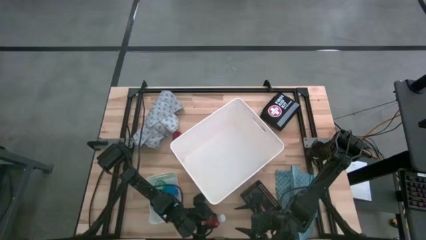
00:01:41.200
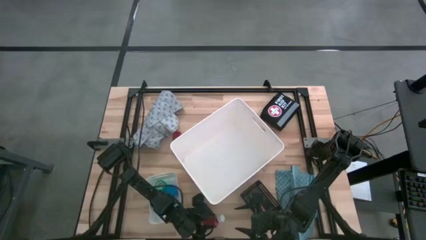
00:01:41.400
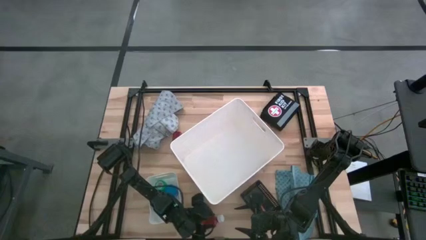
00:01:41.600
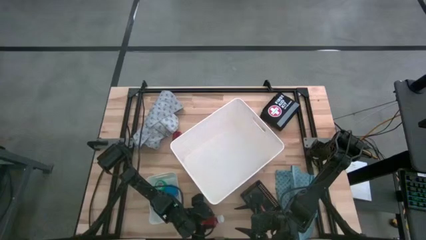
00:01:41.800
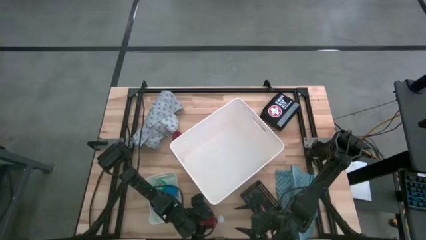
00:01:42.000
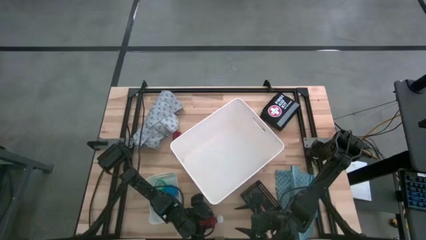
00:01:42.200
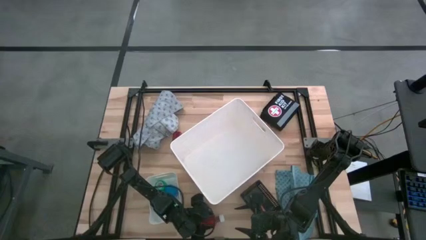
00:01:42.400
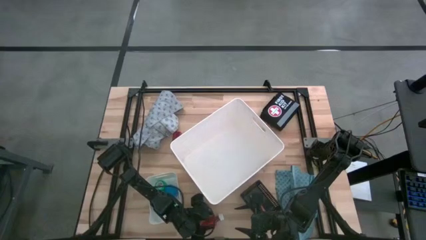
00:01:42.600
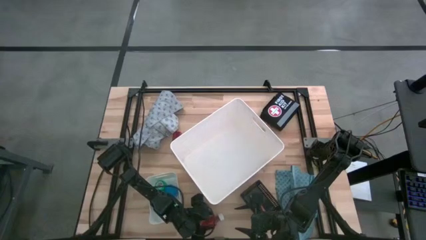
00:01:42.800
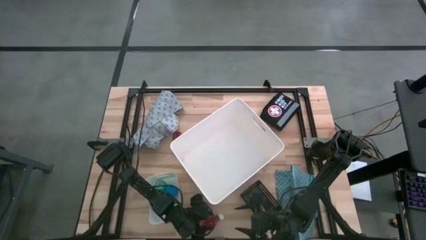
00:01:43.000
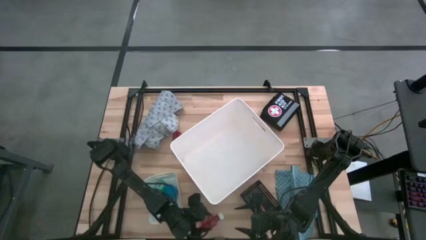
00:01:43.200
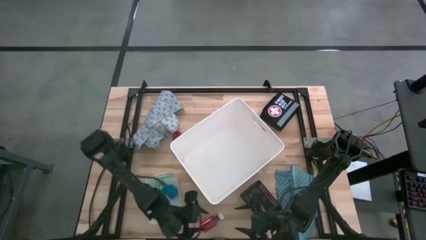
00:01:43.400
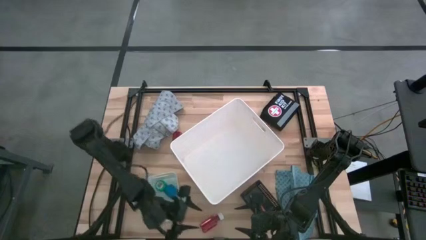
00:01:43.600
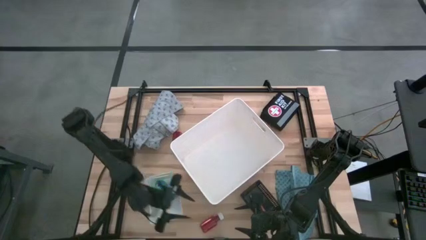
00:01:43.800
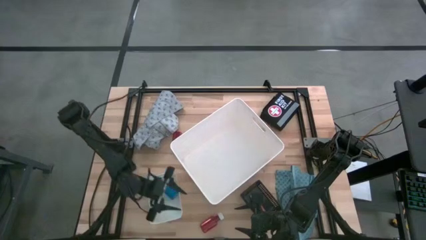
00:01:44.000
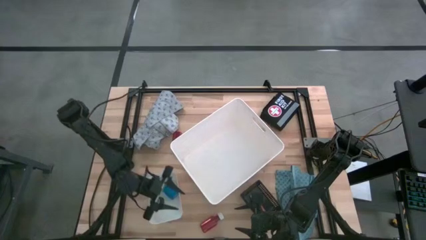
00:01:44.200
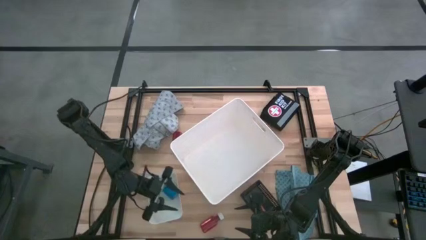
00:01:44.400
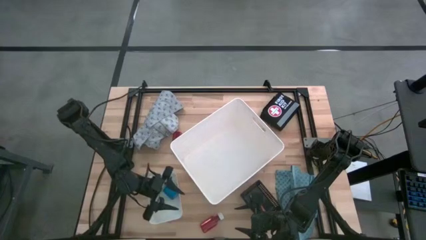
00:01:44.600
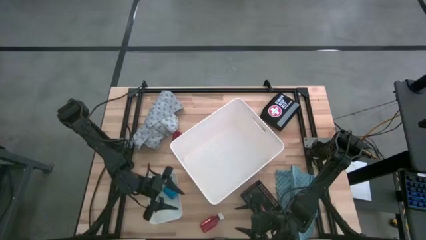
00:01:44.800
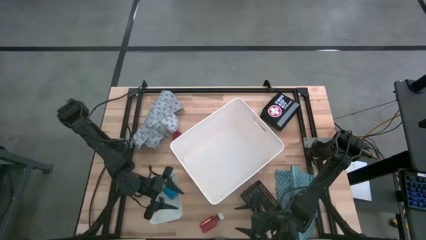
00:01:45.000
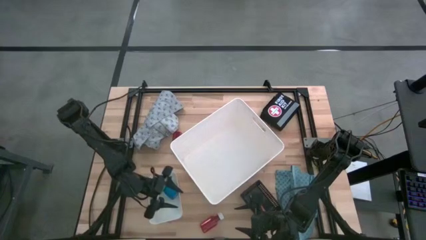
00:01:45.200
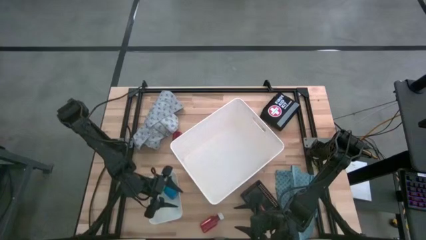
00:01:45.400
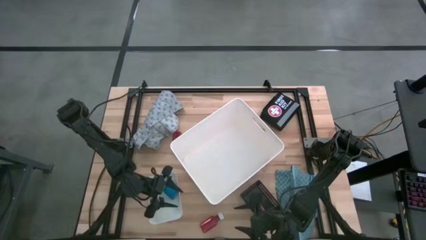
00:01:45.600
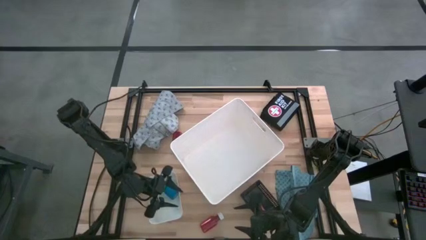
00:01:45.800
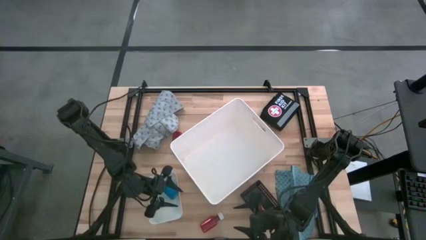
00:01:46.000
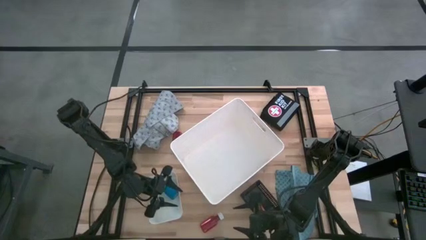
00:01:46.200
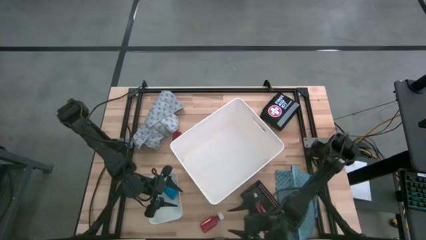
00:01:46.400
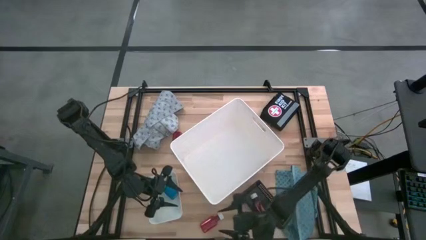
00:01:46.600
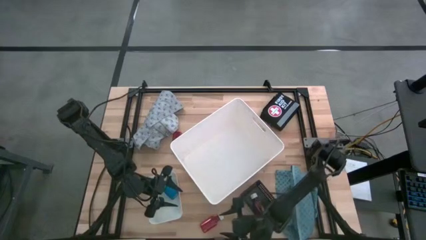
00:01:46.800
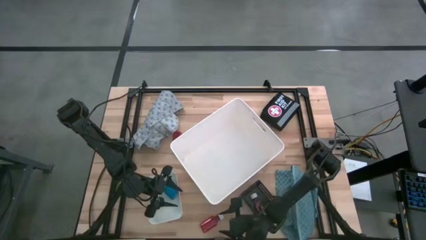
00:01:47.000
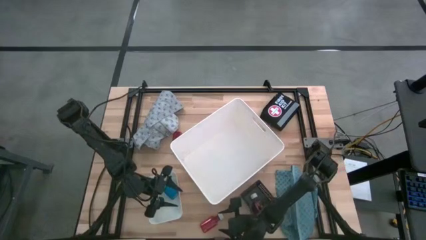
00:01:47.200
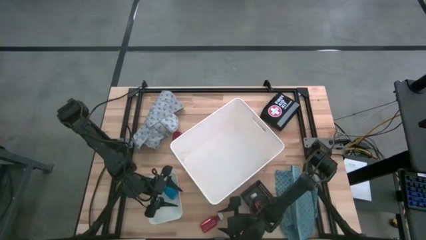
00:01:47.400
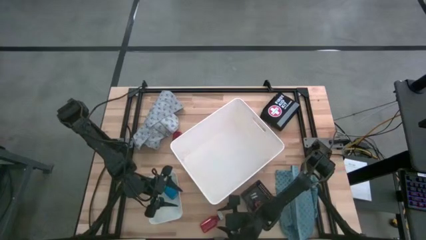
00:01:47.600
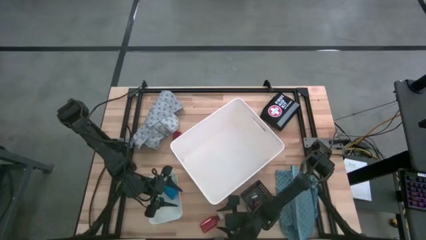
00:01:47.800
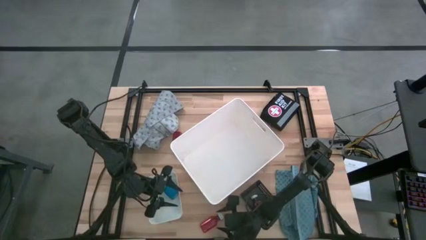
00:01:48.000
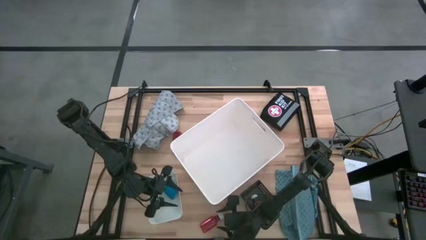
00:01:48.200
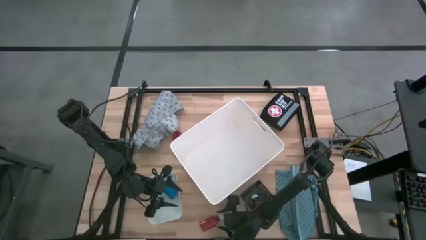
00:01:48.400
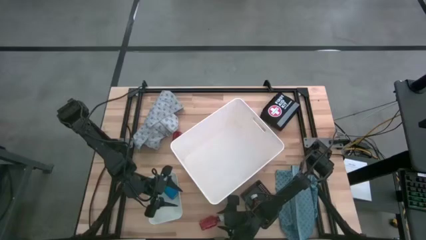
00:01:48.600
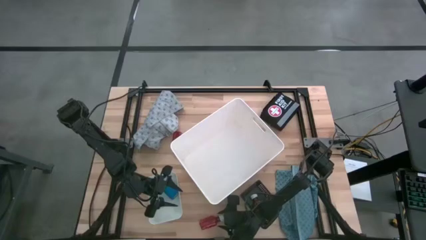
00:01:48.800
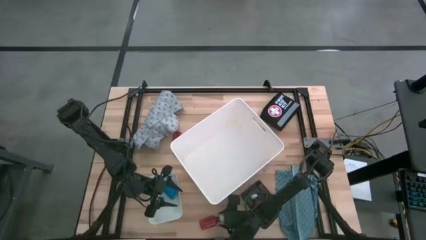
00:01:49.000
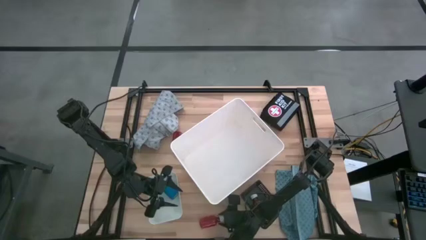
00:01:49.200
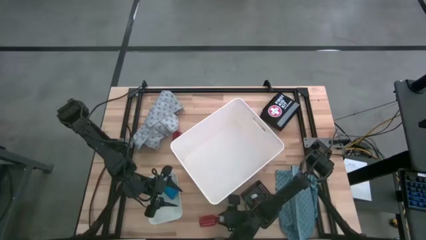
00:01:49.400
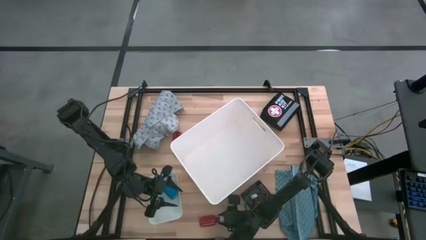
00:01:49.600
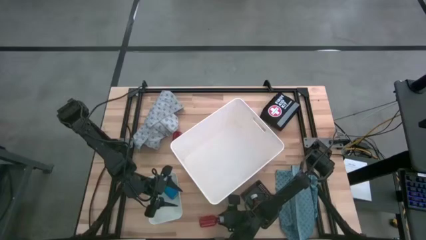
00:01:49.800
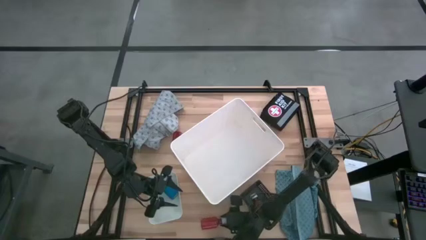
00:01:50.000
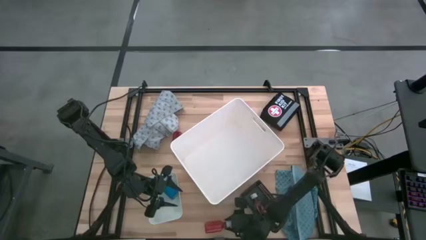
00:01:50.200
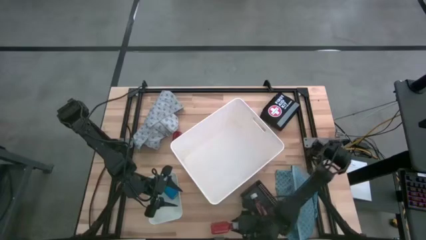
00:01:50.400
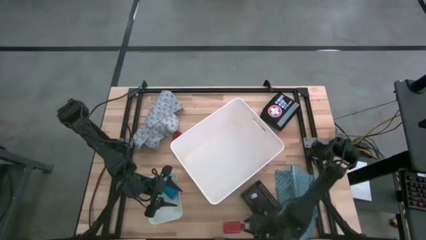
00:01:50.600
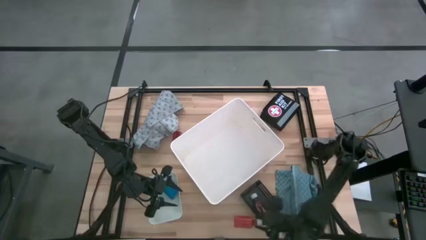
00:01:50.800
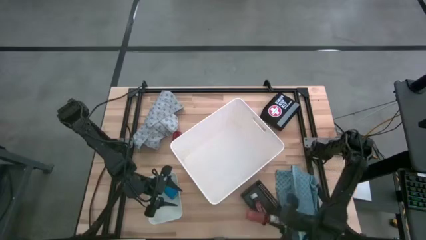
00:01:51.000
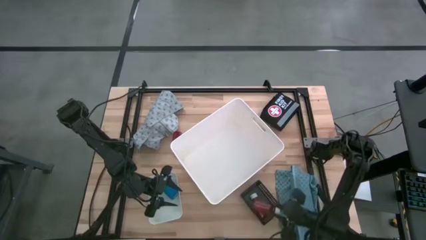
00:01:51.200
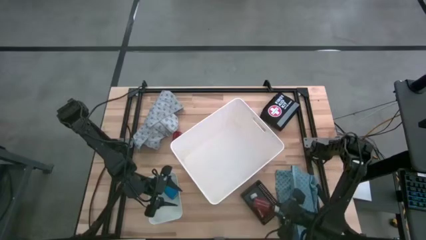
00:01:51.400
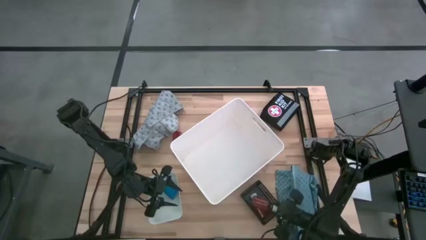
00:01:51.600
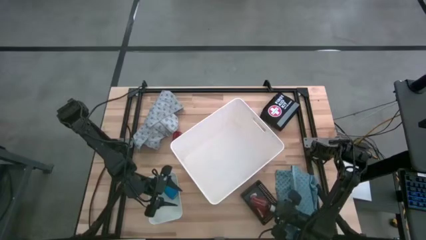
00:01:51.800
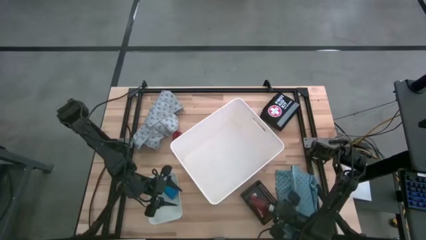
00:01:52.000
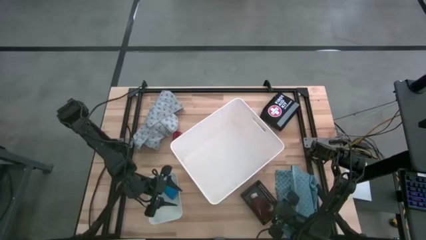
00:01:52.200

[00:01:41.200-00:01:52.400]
Task: Pick & place medical supplies in basket/bin
Put the bottom orange bottle into the black basket

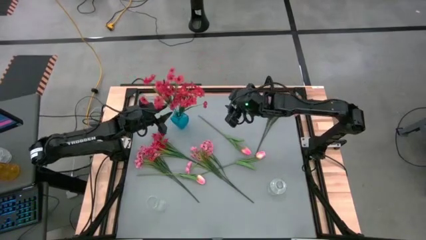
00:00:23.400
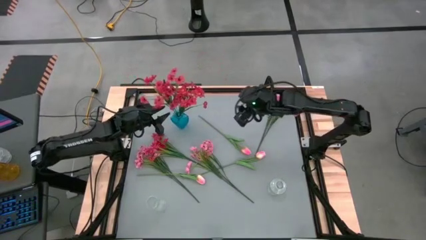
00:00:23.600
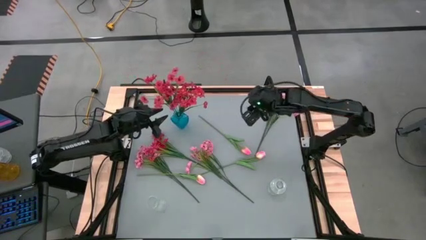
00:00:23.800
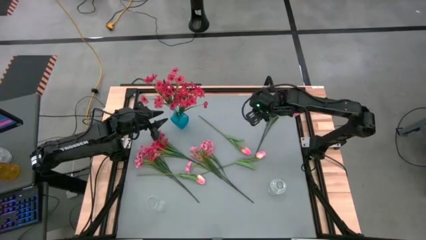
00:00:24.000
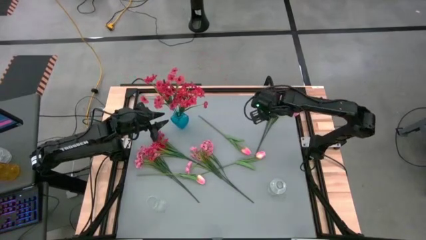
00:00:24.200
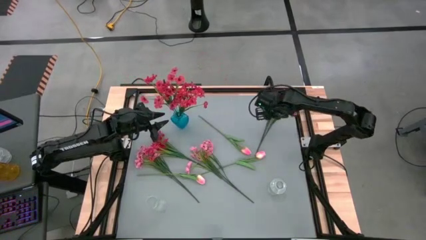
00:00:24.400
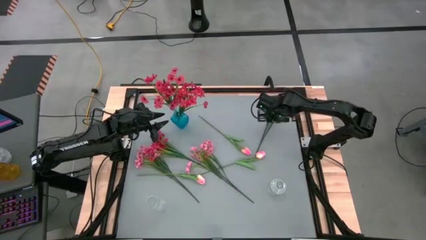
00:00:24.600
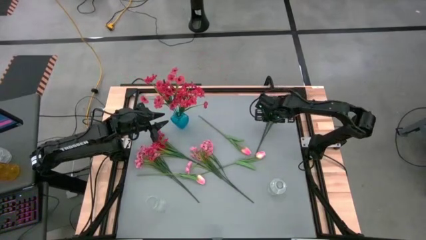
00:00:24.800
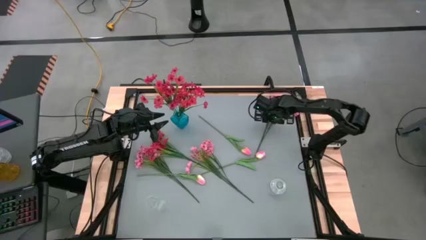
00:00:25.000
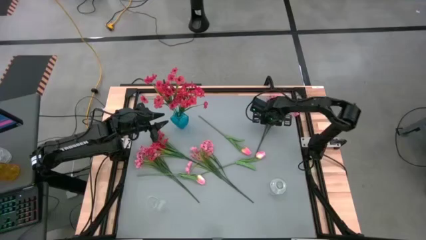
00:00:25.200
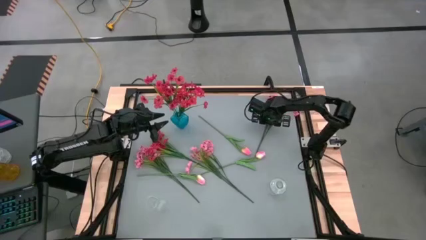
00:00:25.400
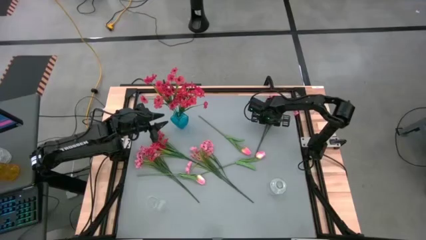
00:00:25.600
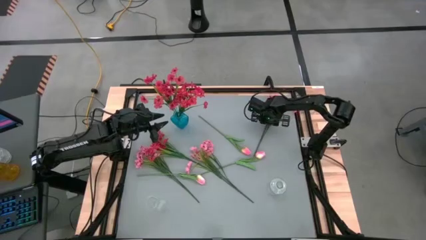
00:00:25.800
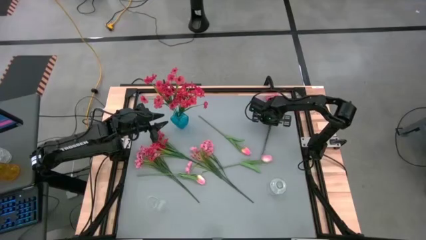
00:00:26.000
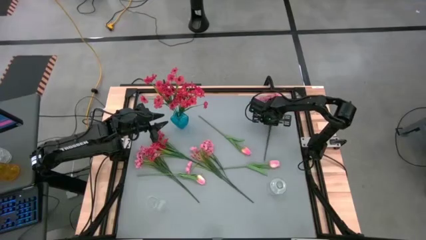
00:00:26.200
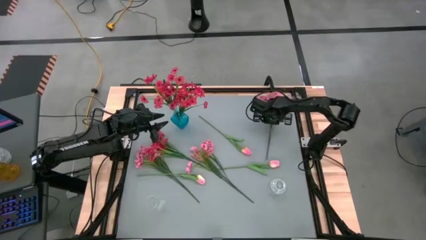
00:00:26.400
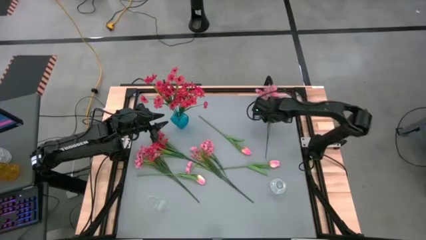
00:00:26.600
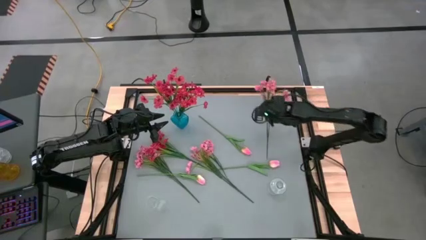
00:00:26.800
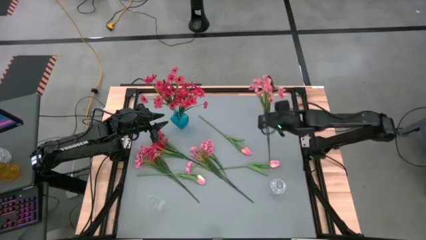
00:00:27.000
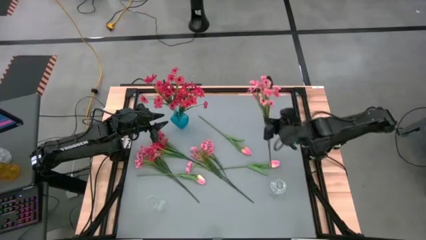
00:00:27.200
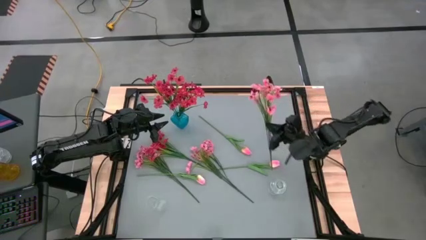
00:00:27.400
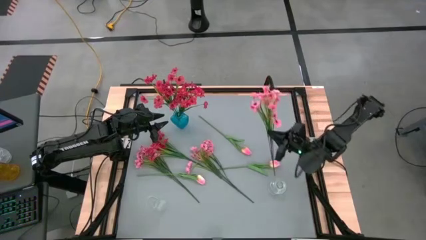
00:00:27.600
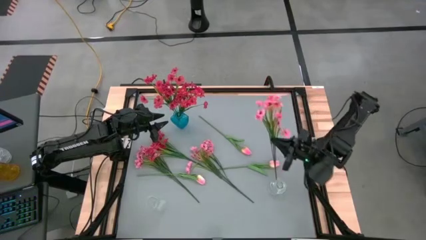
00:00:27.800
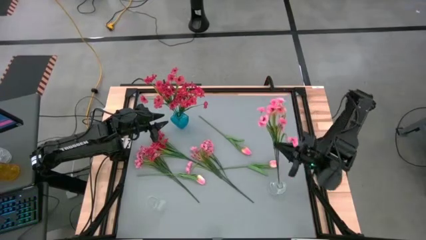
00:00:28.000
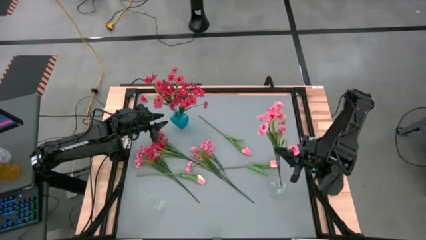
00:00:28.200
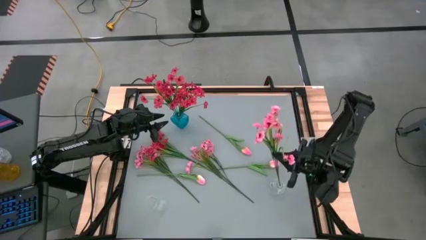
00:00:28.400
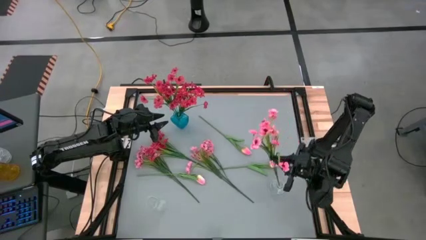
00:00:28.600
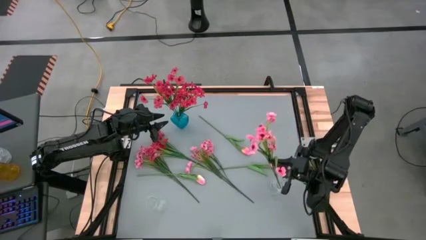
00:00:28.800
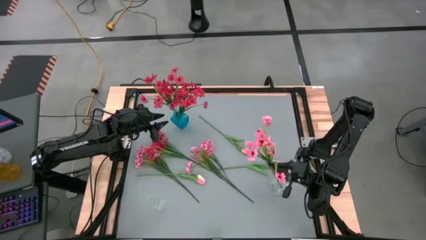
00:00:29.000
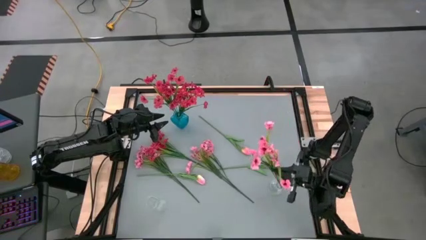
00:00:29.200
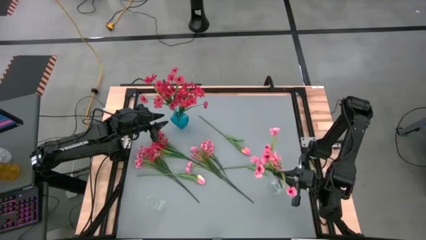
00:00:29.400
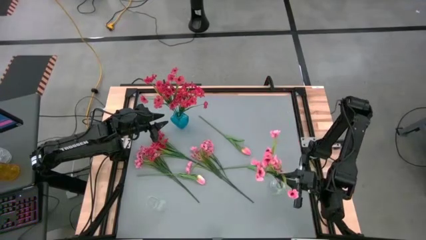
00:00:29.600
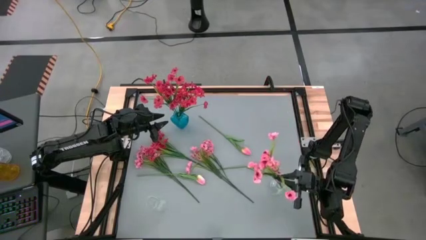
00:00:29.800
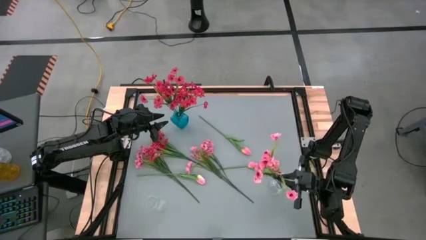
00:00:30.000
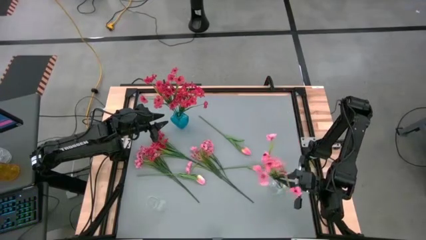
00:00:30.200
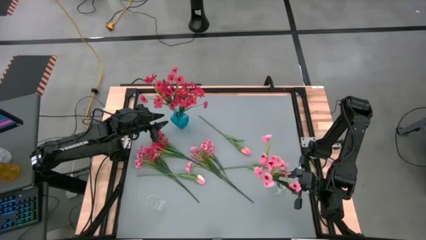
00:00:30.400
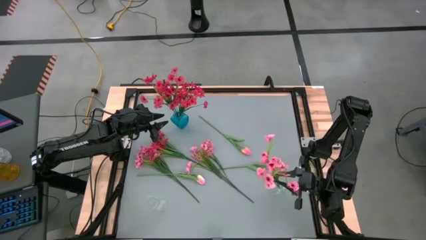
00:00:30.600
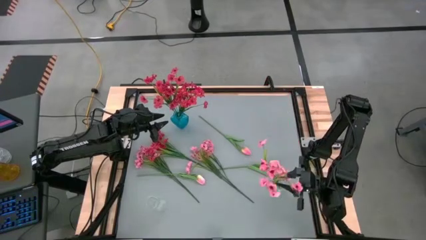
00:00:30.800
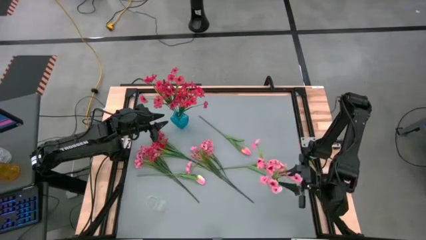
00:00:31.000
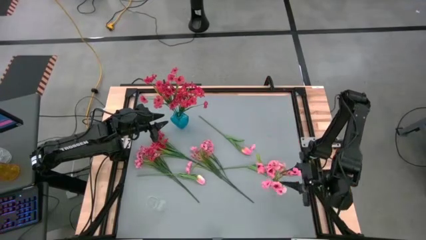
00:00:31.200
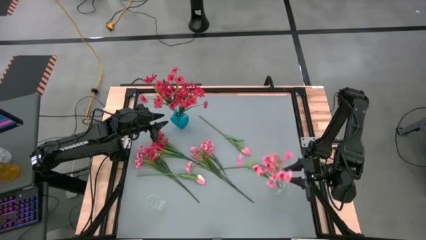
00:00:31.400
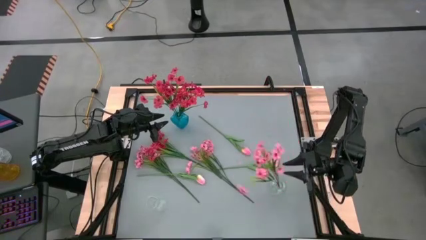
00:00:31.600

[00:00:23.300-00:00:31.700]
Task: Sort flowers into vase by color
Put the top pink flowers into the right transparent vase
